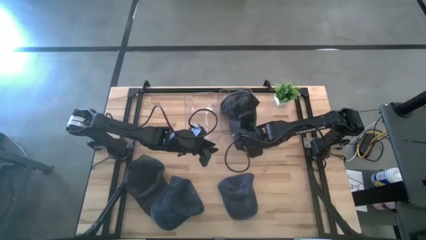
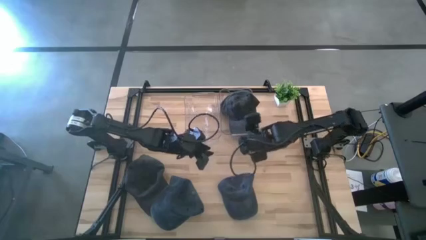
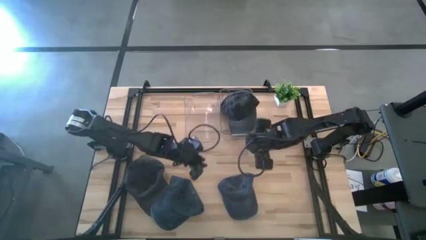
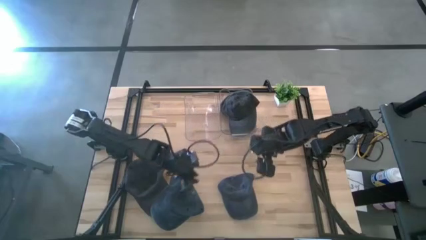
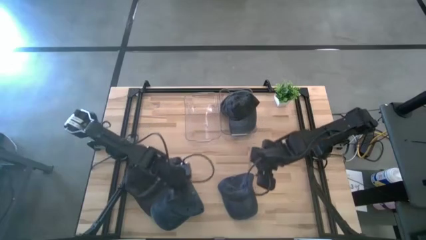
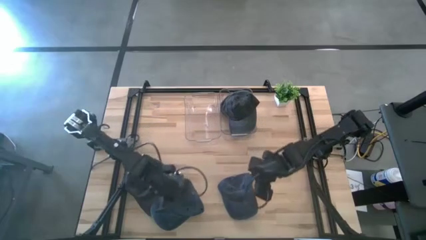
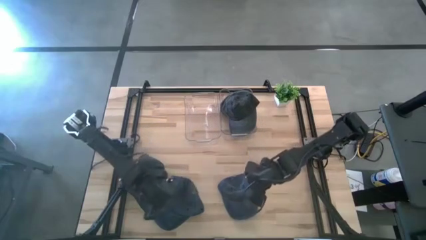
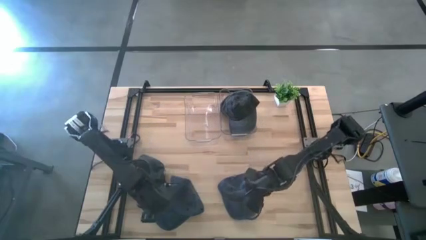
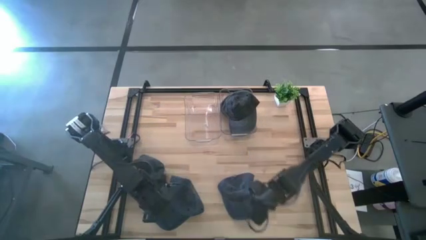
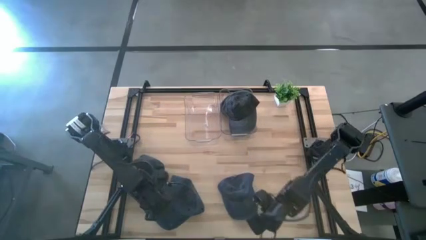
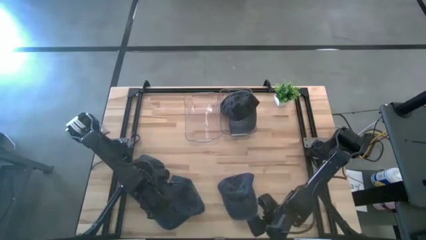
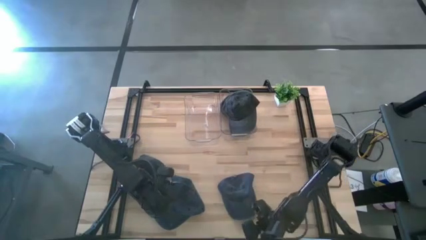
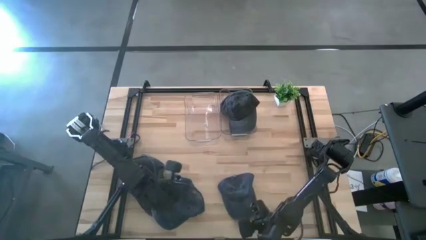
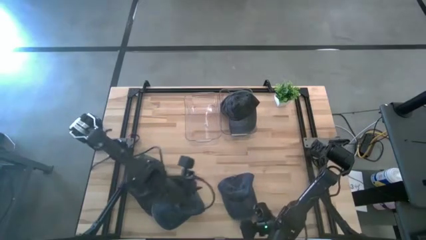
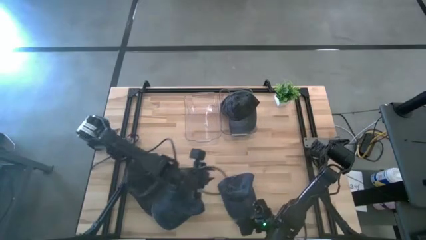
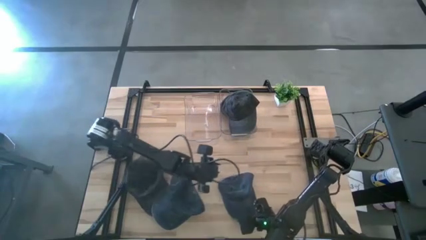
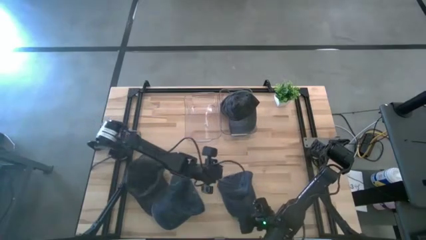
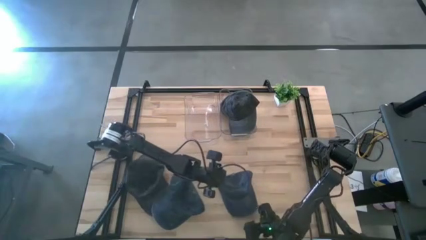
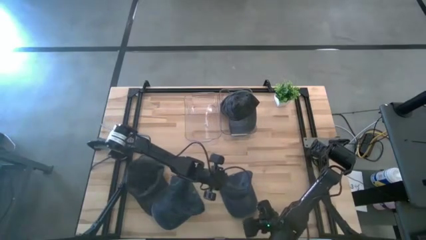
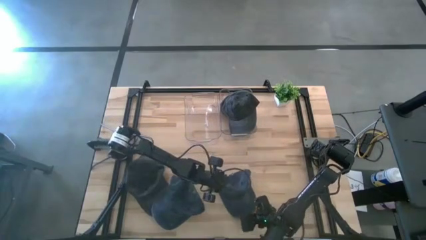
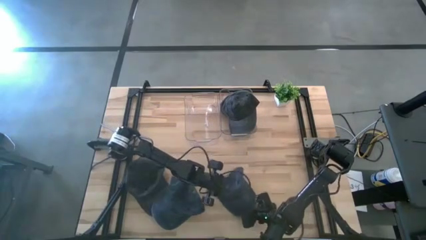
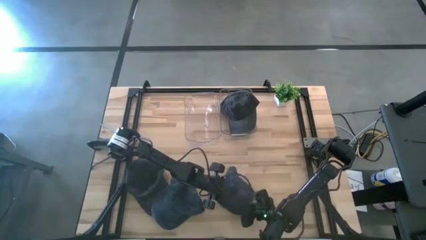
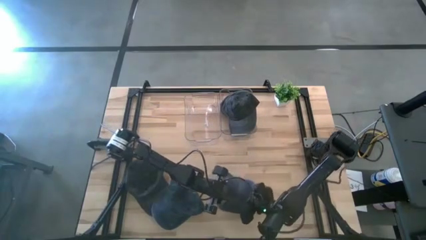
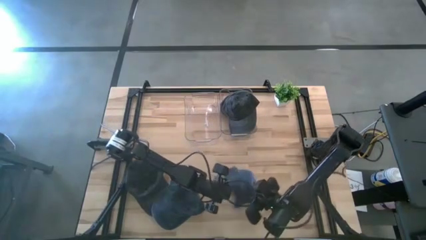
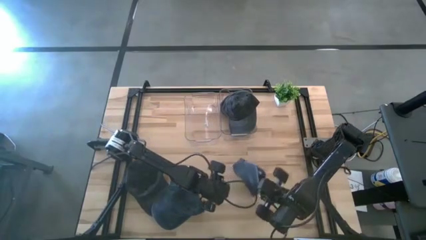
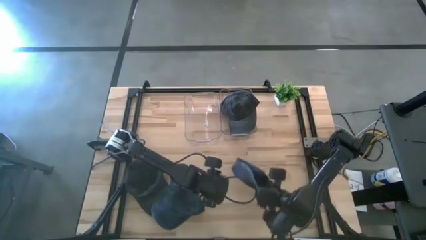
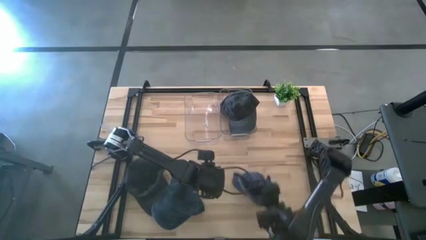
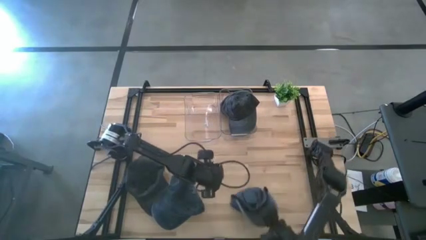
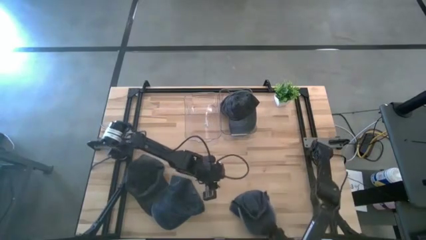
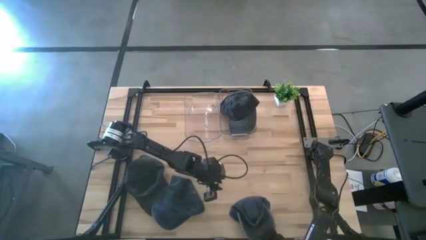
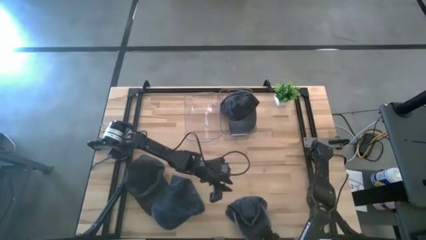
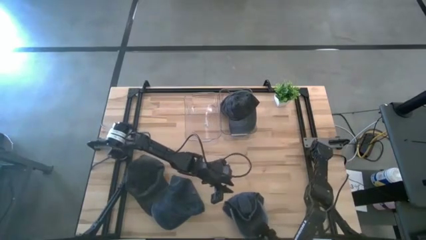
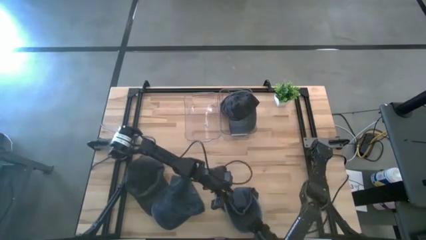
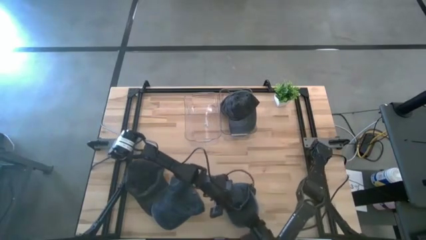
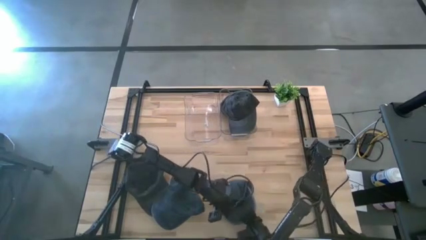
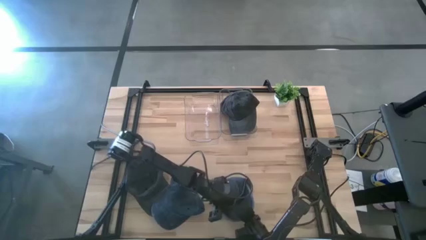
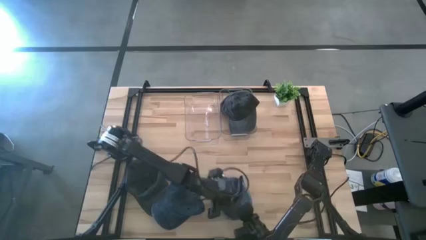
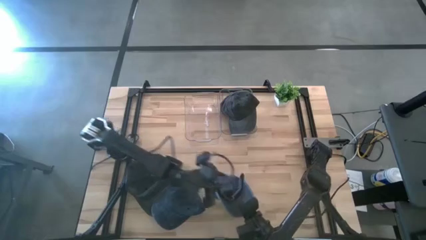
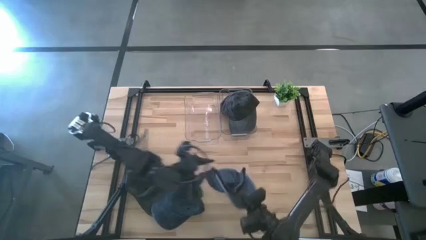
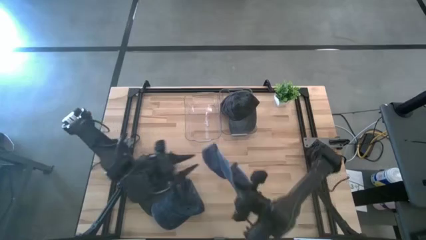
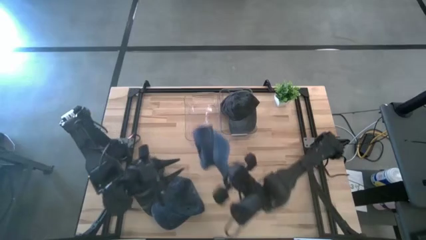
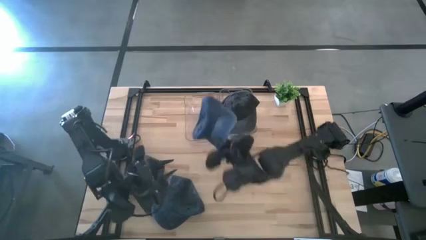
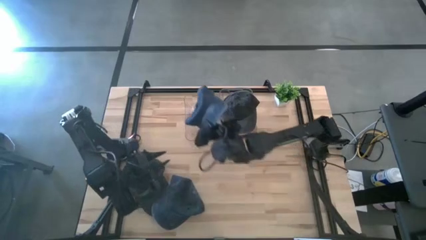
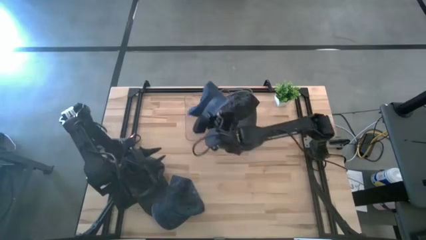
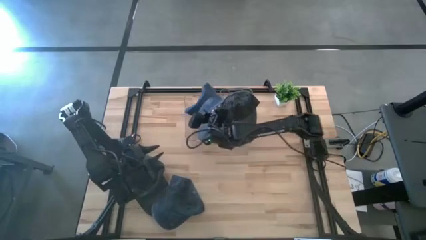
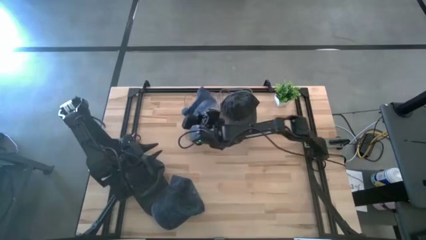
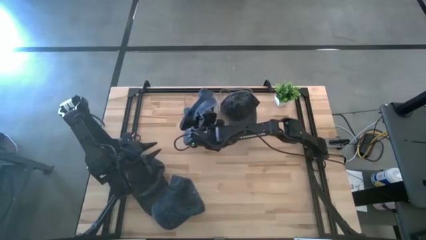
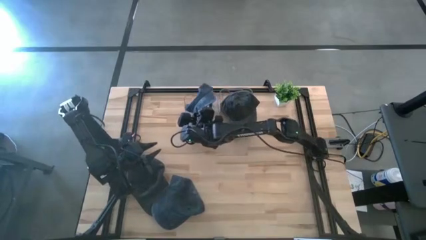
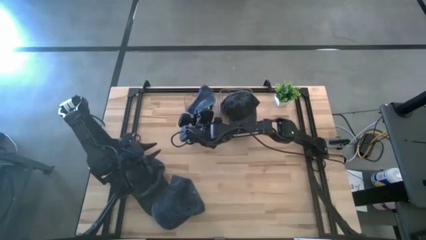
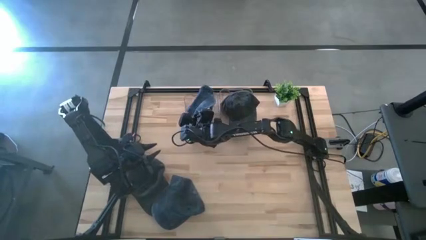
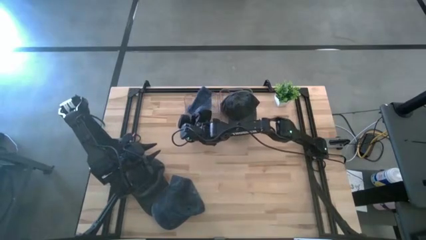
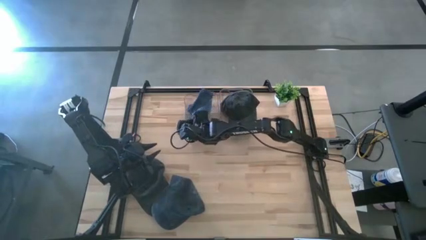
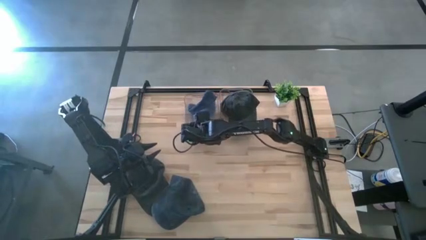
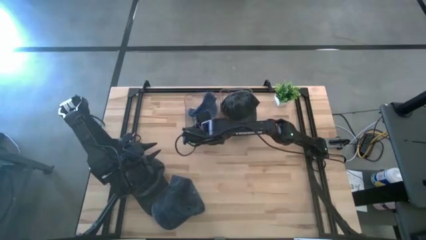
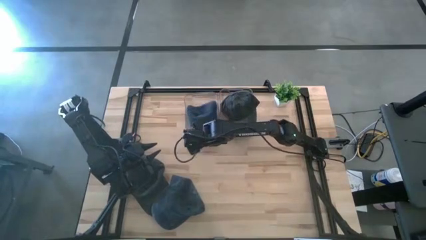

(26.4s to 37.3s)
Task: Pick & Place hat
Put the right blue cap into the left transparent bin

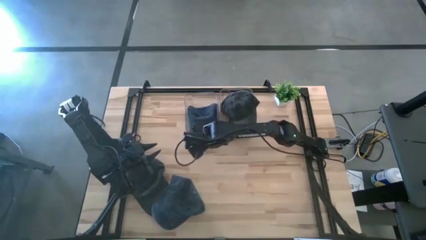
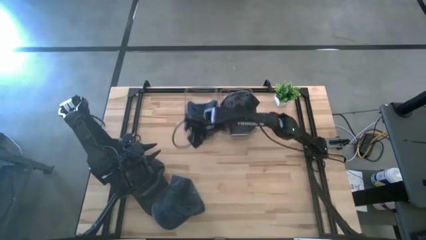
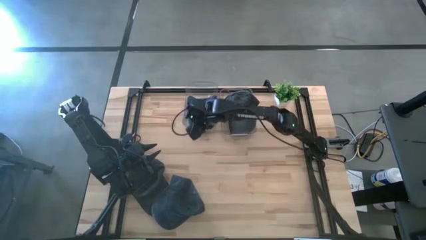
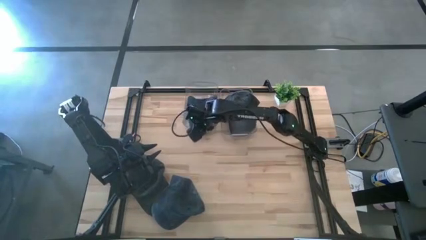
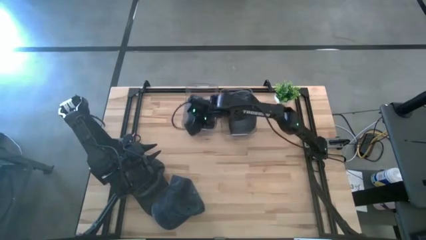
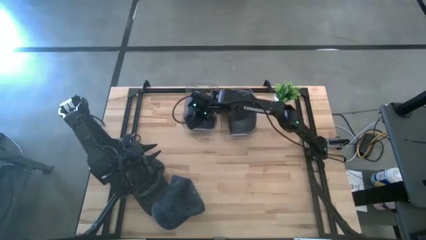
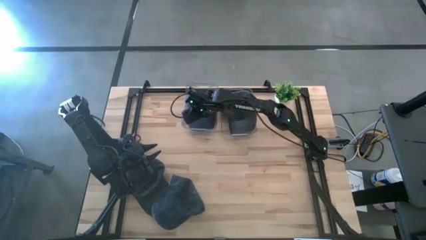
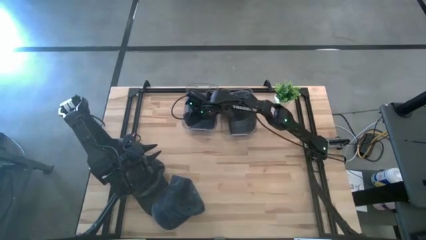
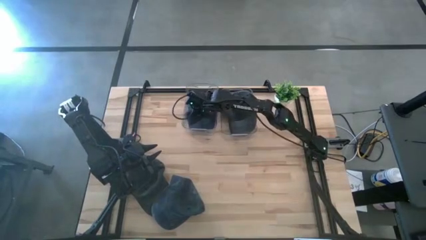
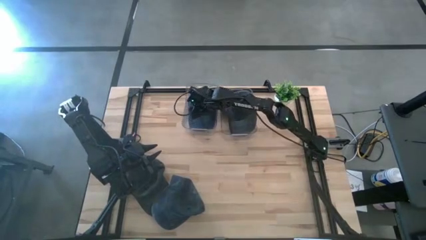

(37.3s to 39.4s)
Adjust the left transparent bin on the table
